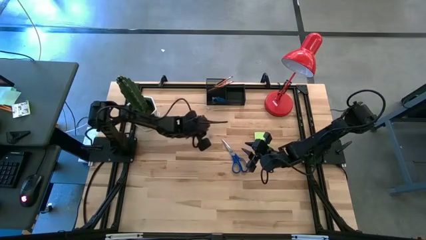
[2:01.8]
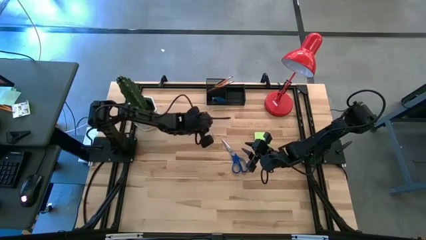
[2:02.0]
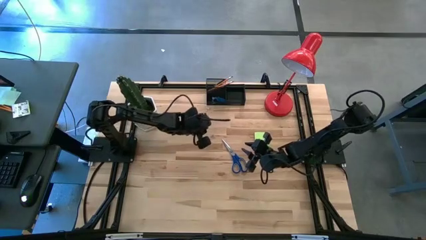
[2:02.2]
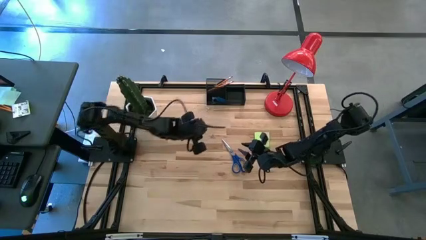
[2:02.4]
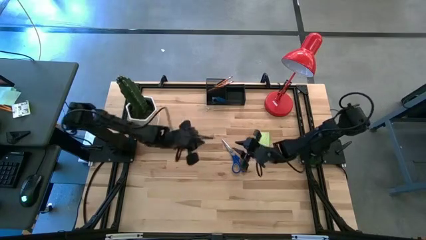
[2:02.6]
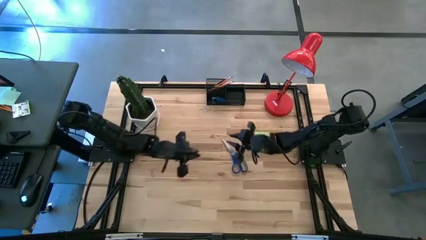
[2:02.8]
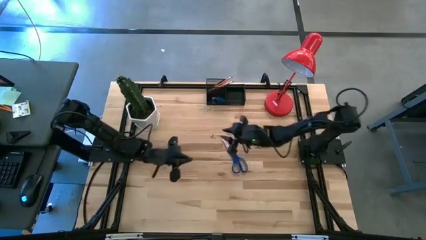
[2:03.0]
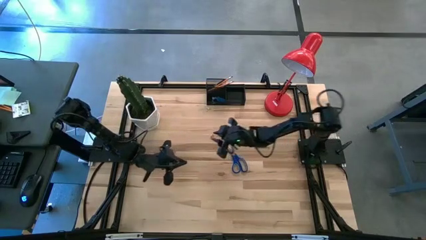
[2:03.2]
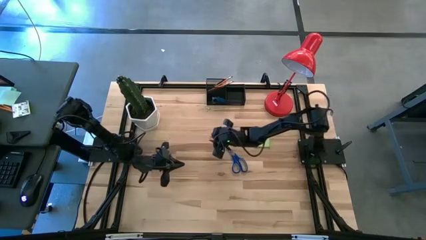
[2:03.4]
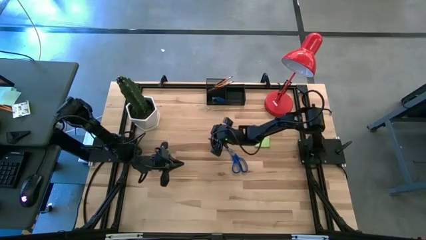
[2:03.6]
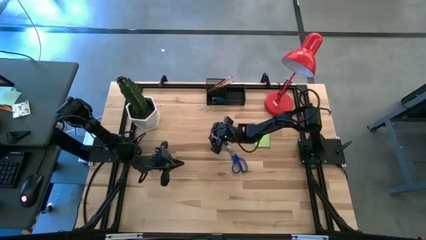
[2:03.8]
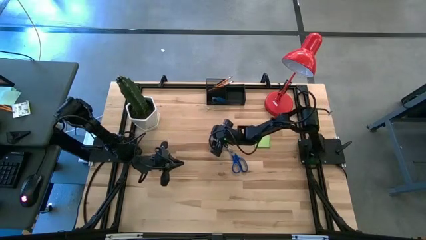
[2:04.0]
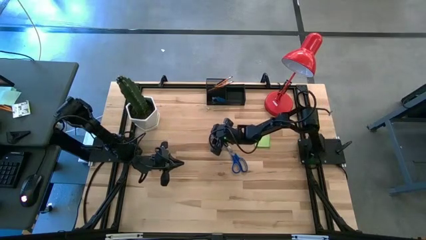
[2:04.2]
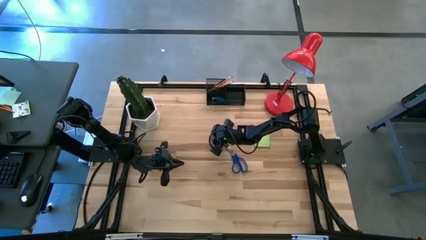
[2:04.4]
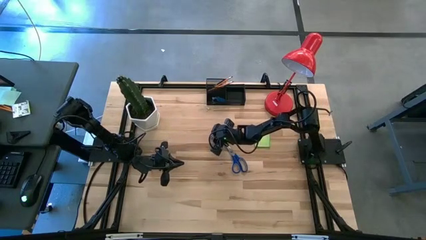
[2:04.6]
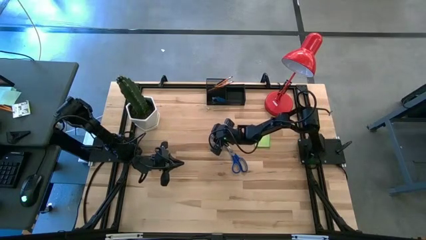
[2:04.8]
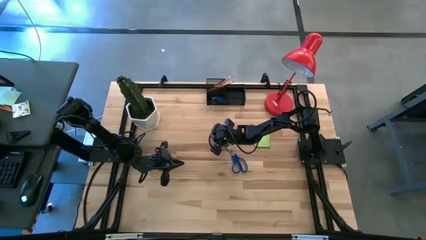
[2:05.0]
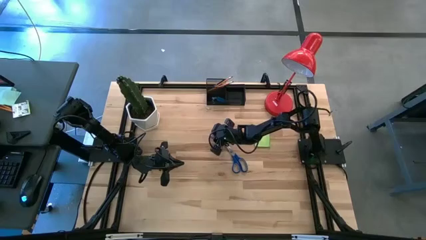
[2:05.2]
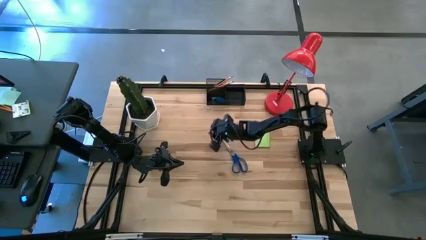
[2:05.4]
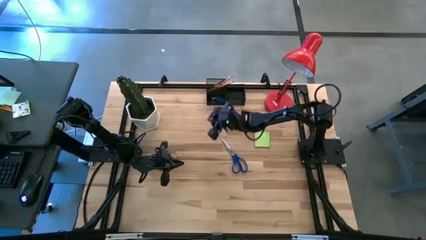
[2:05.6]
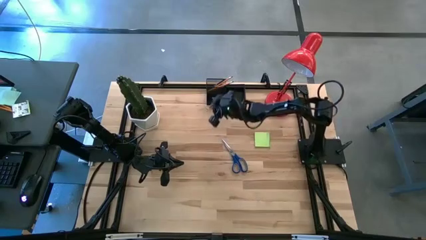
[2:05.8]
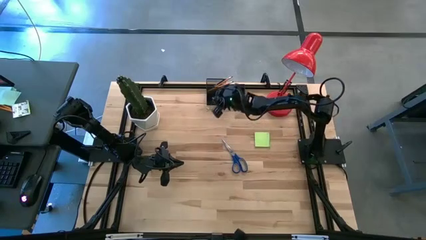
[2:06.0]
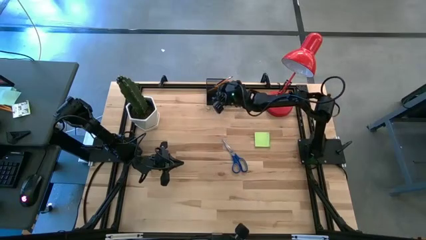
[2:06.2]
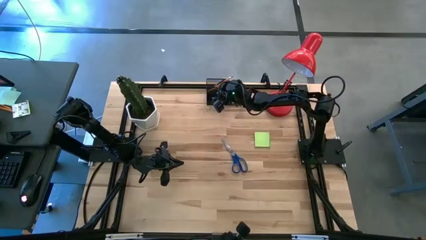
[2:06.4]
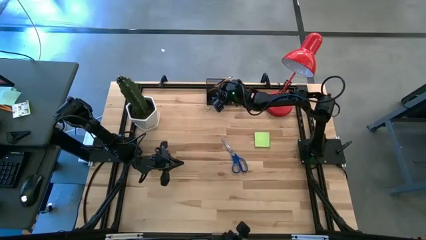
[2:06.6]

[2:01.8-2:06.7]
Task: Pick and place office supplies into organizer
Put the pink binder clip into the bottom left section of the desk organizer

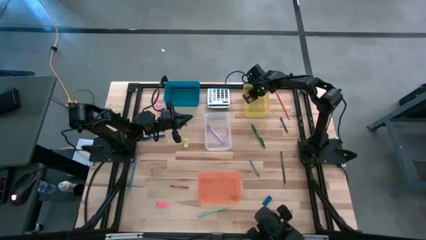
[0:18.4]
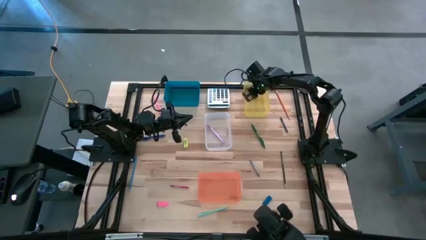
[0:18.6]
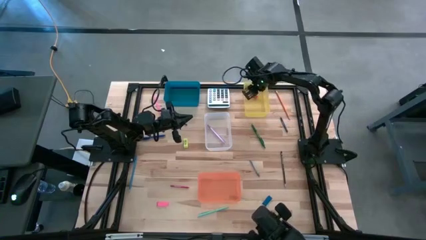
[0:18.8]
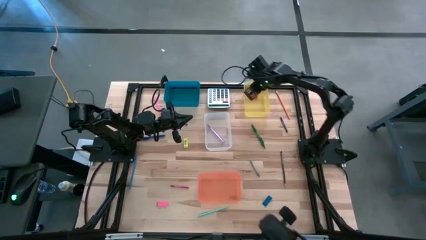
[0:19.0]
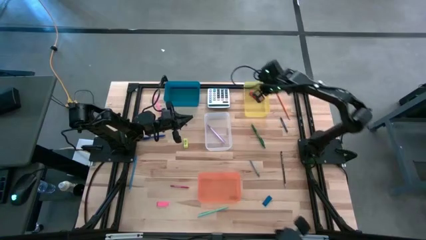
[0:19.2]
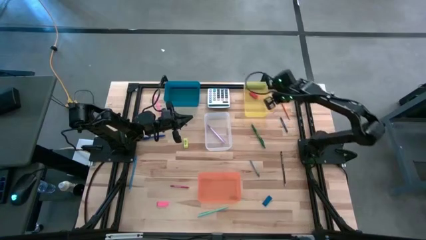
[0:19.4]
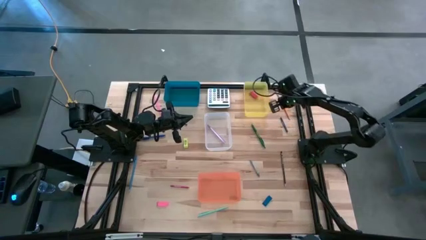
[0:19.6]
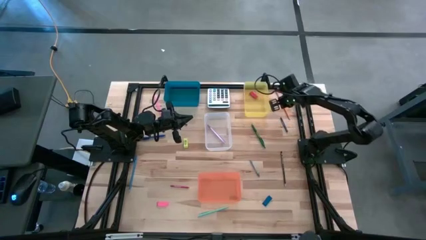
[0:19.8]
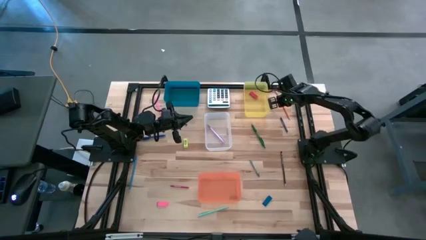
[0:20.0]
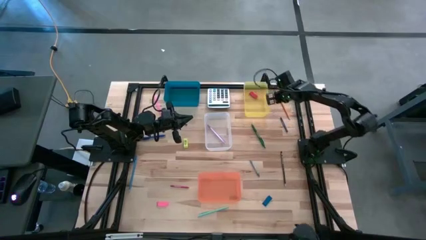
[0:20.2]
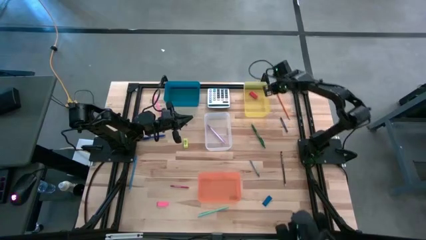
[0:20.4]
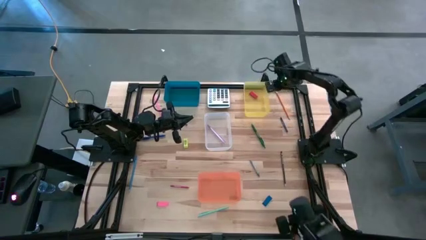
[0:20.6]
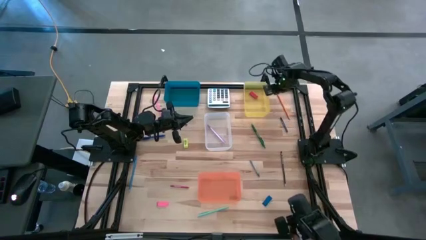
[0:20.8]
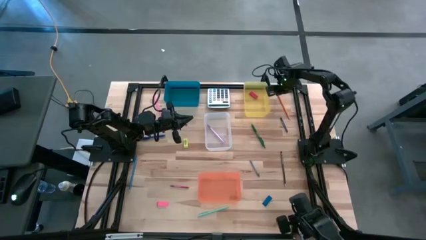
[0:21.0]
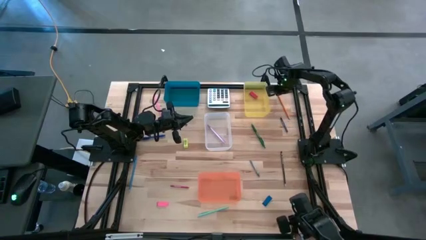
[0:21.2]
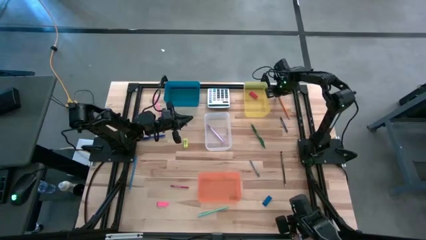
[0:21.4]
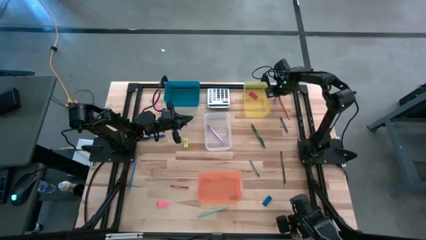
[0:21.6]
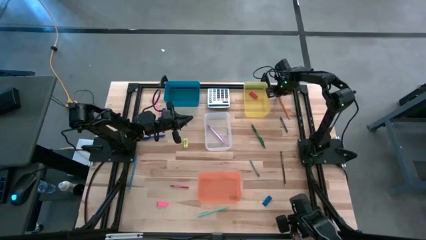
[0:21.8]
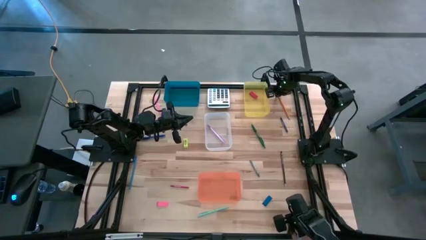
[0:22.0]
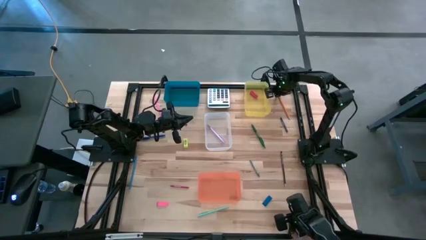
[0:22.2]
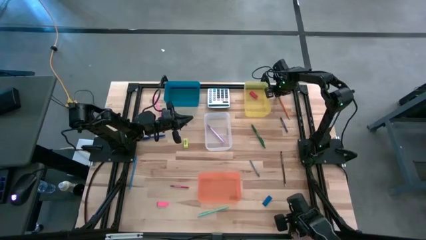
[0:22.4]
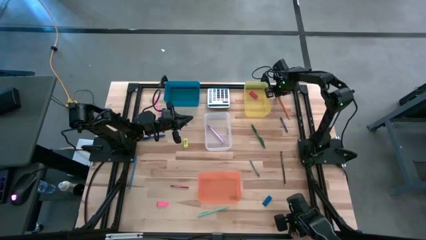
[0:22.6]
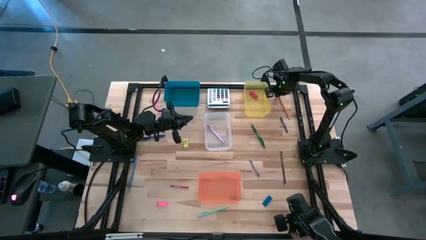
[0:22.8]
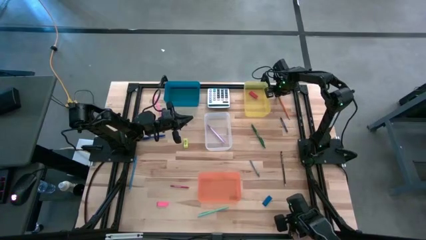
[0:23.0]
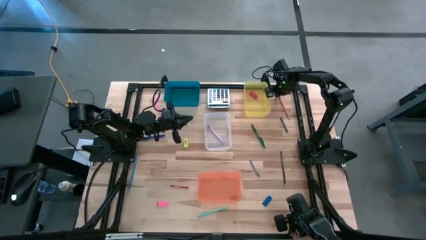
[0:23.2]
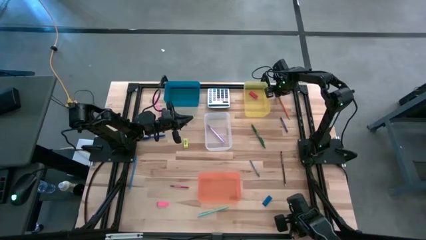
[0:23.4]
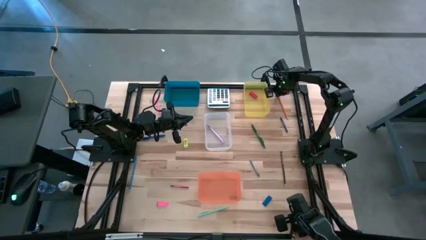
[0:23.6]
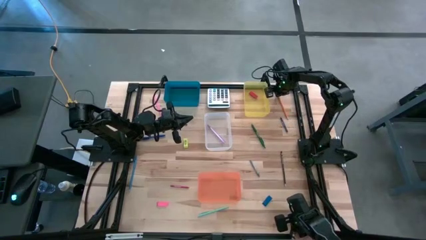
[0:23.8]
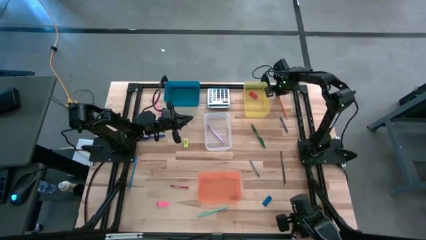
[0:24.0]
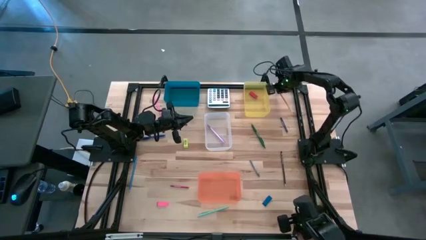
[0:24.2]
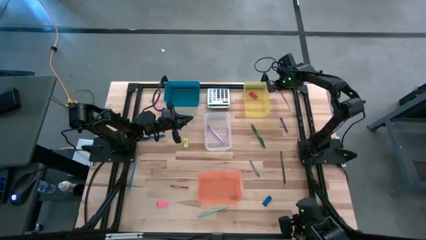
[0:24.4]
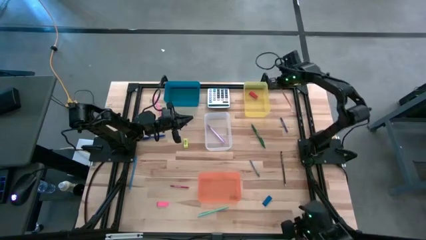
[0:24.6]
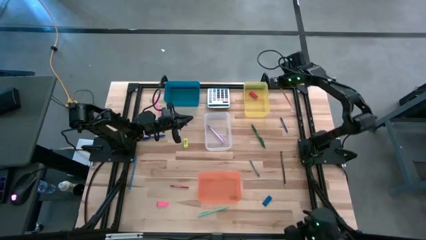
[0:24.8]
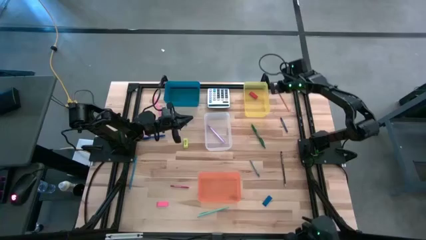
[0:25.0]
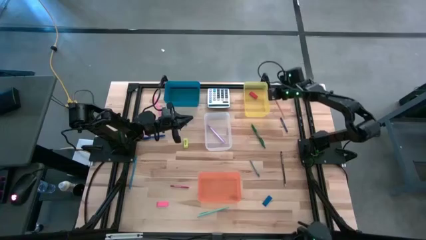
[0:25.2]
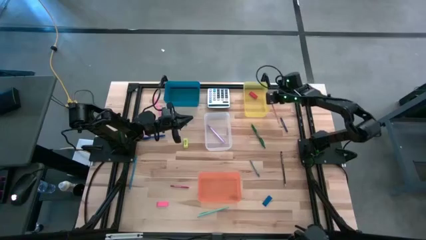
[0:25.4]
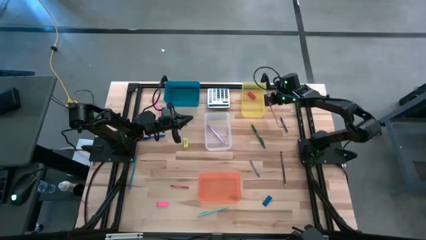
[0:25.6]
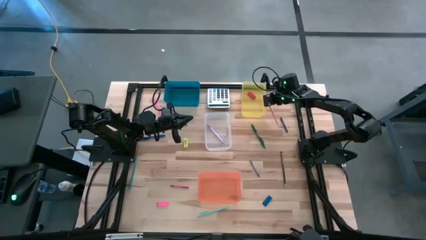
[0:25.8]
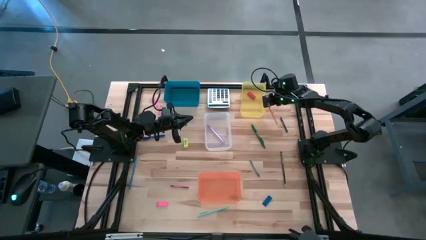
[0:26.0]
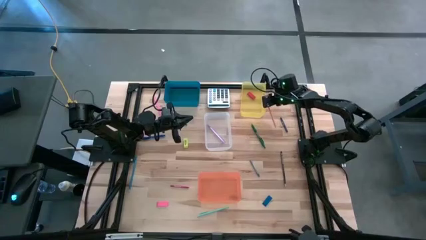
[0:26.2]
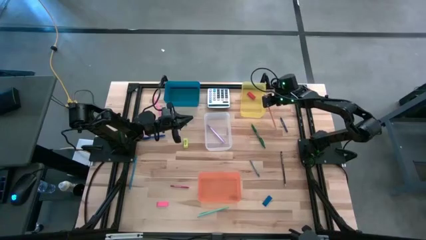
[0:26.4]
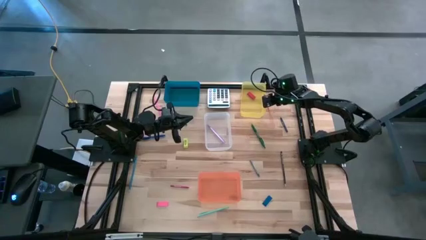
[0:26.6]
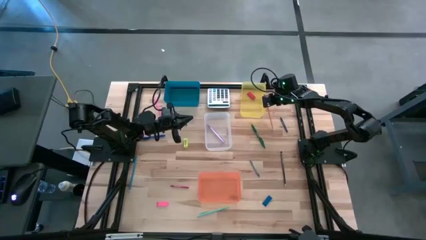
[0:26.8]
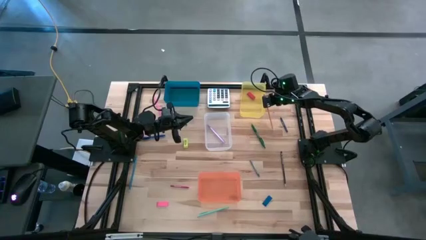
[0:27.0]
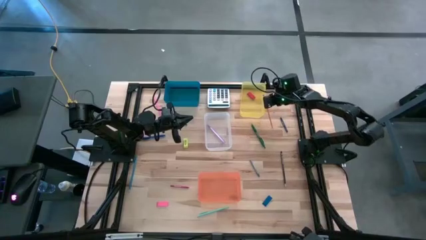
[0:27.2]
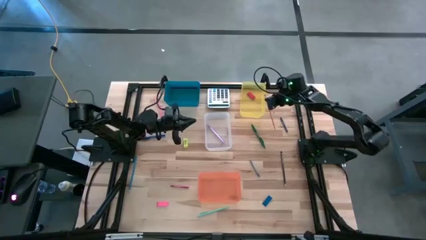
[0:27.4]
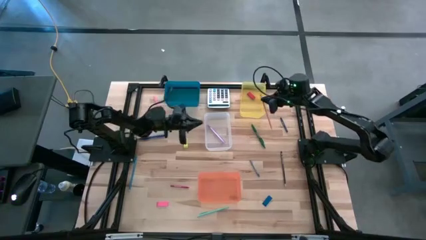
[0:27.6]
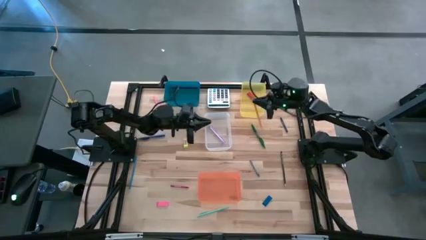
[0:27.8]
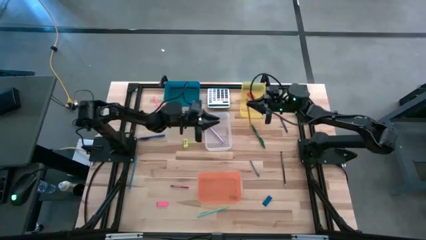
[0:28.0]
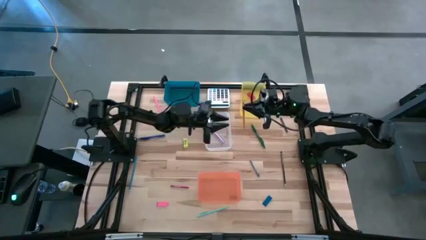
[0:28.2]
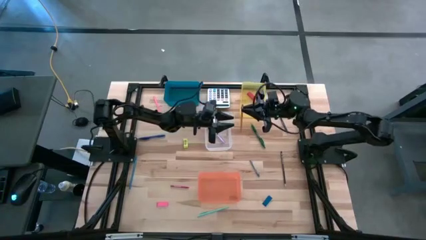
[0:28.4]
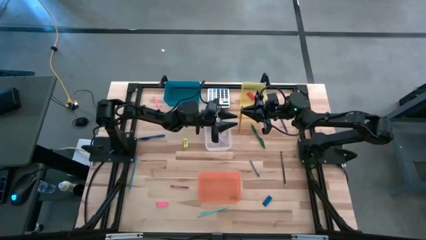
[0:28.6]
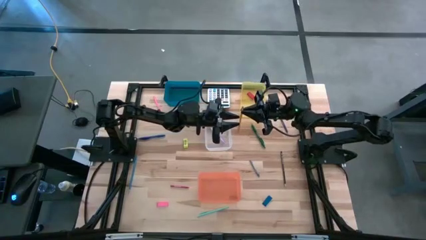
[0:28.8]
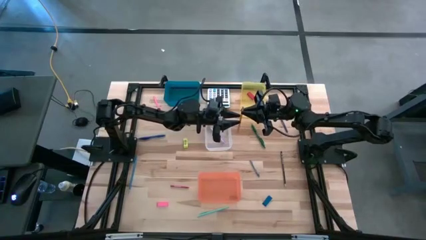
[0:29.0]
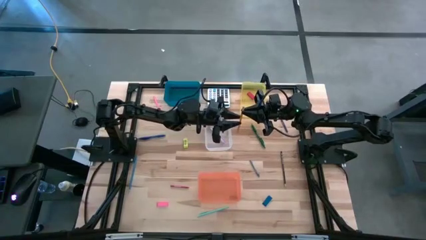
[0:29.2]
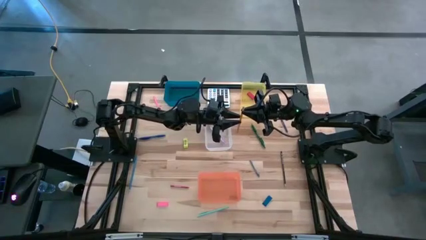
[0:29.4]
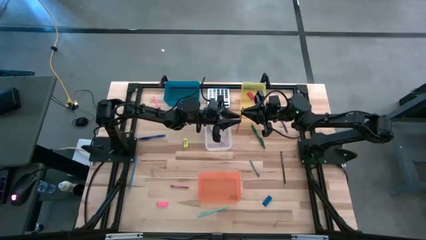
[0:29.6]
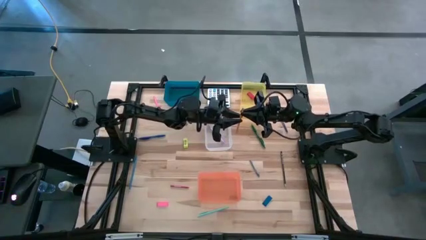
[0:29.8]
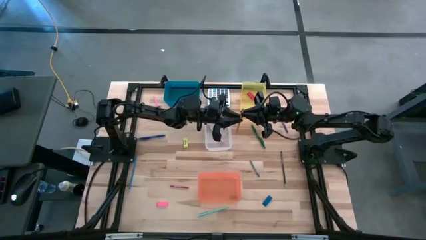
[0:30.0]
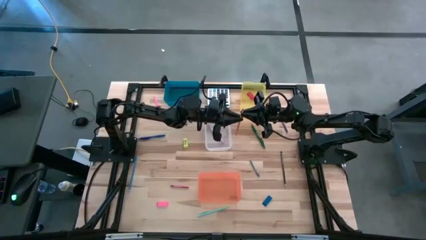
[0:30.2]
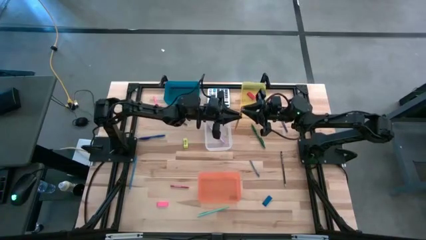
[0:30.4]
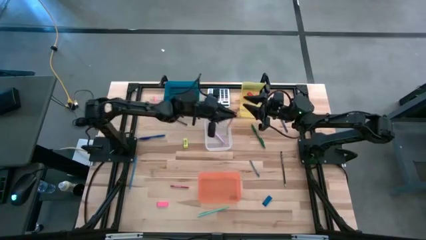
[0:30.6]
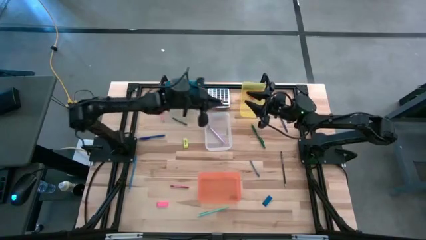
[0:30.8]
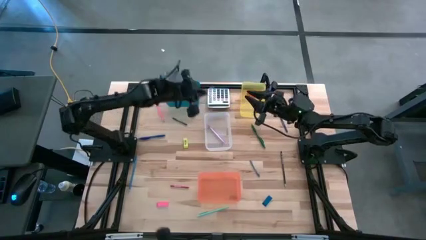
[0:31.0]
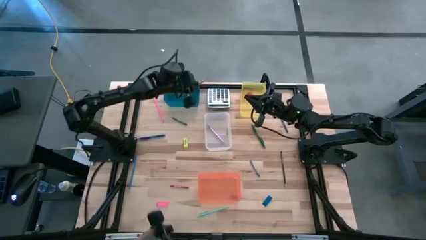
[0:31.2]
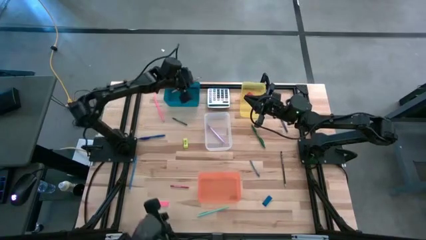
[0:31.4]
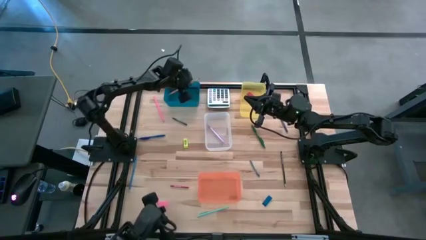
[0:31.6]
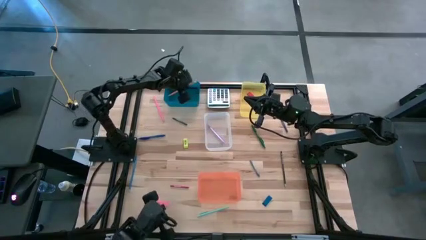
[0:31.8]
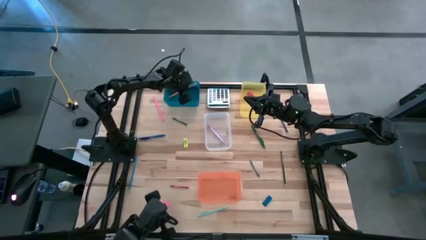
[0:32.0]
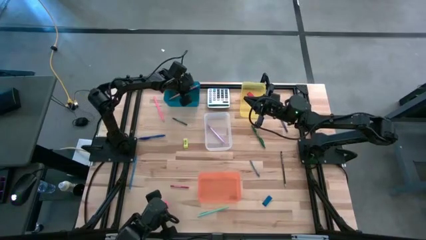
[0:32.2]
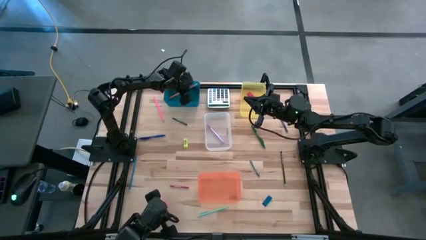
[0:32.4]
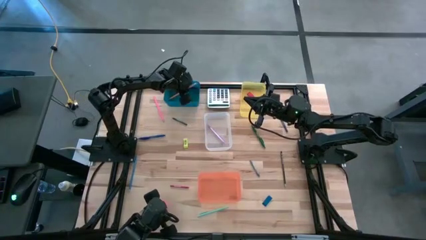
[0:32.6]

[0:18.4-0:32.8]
Task: Sort crayons/erasers/pens/pencils in bins
Put the yellow pencil into the blue bin
